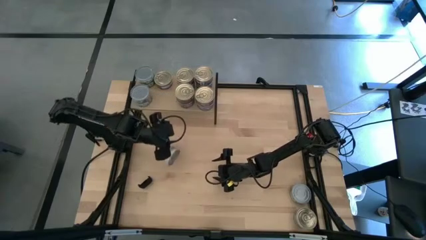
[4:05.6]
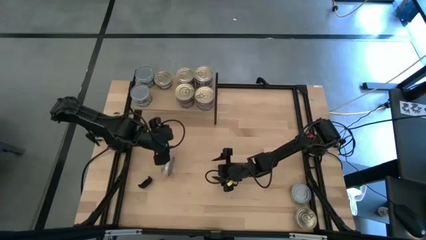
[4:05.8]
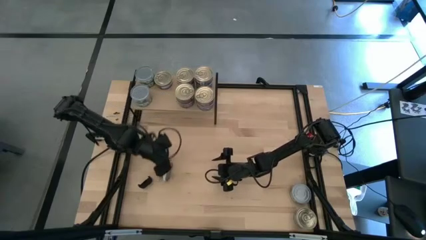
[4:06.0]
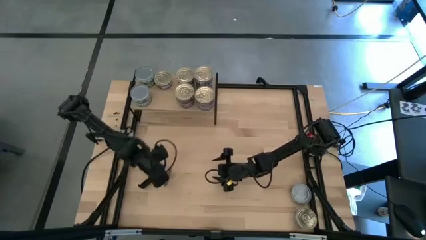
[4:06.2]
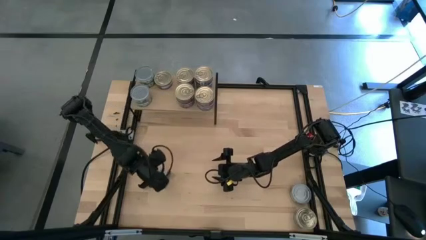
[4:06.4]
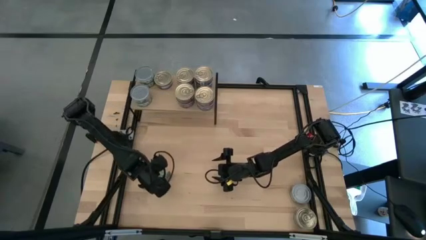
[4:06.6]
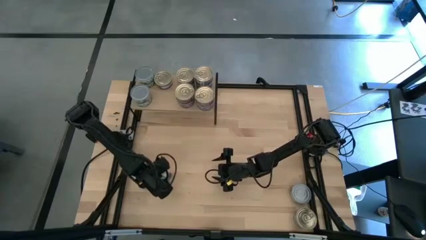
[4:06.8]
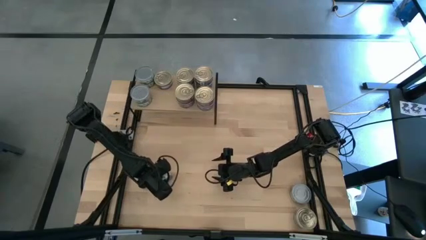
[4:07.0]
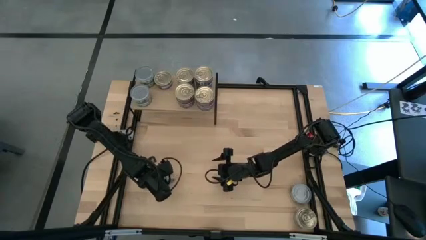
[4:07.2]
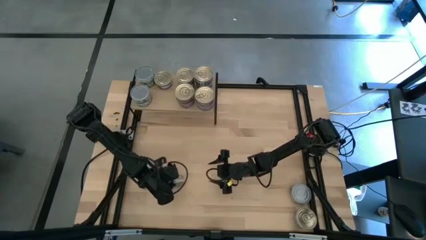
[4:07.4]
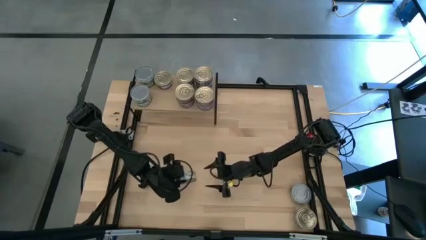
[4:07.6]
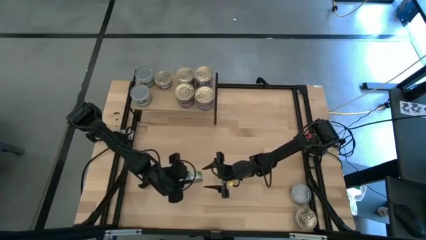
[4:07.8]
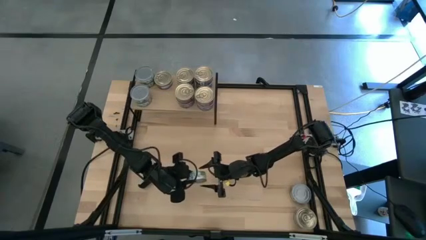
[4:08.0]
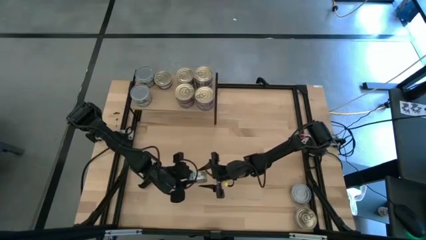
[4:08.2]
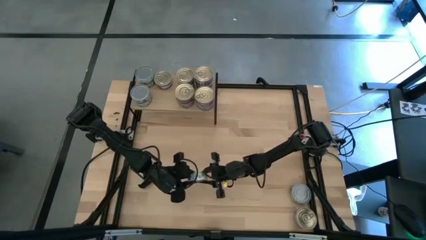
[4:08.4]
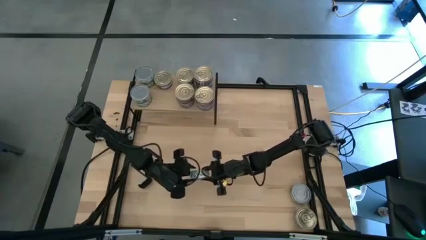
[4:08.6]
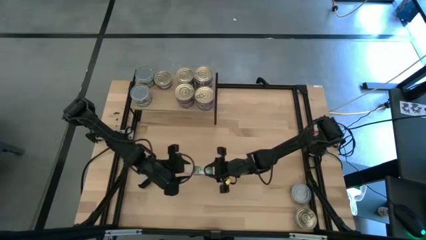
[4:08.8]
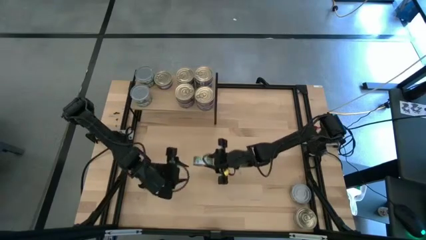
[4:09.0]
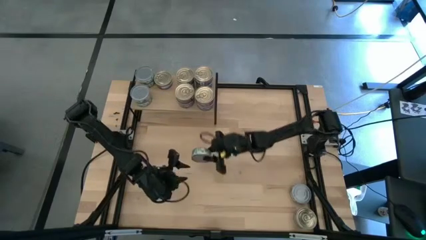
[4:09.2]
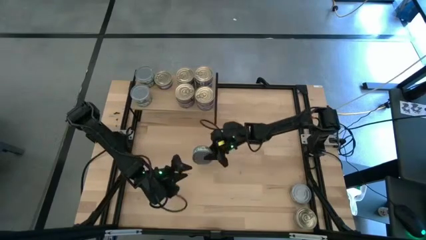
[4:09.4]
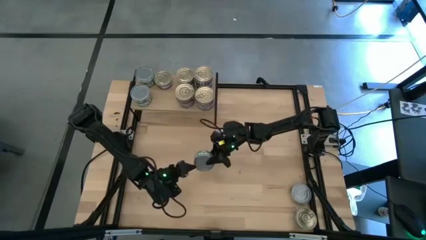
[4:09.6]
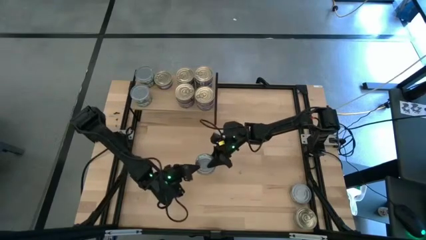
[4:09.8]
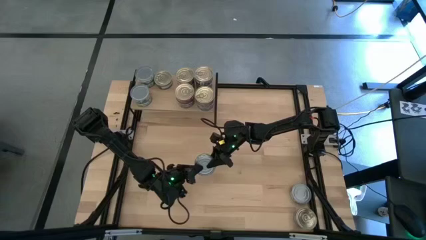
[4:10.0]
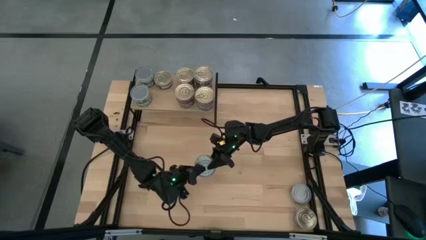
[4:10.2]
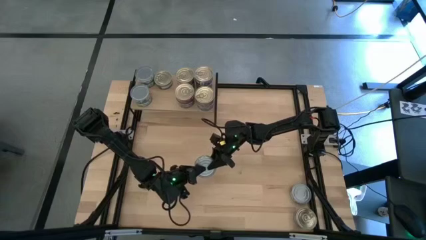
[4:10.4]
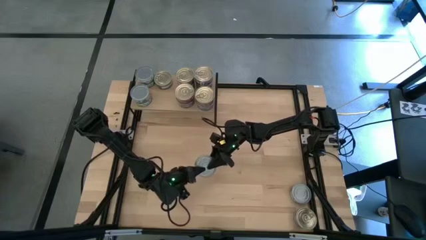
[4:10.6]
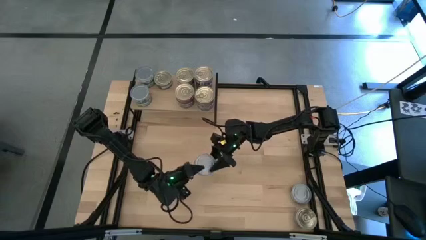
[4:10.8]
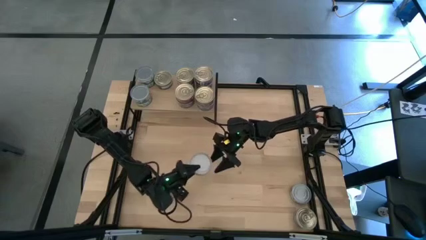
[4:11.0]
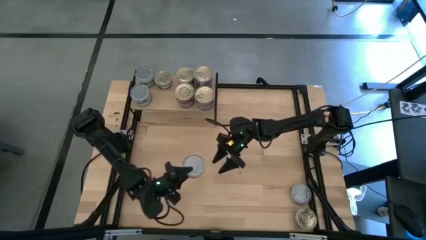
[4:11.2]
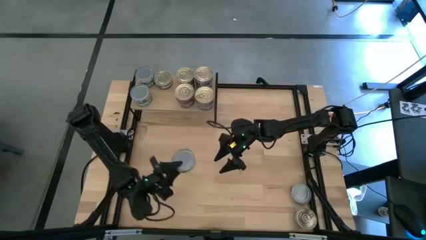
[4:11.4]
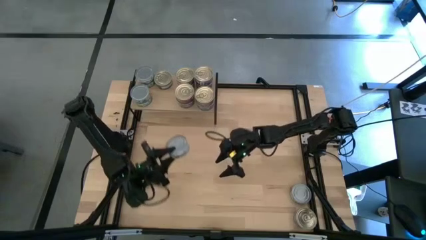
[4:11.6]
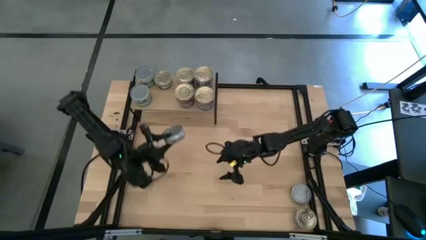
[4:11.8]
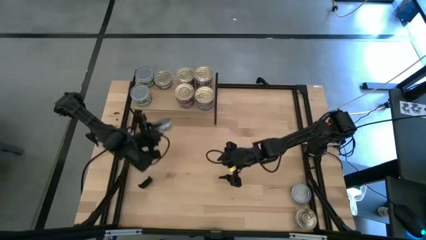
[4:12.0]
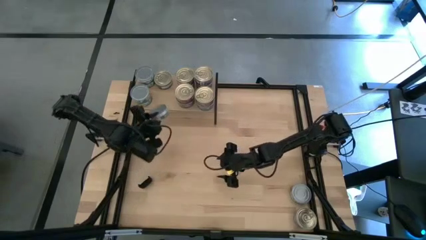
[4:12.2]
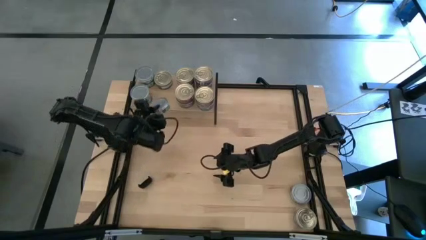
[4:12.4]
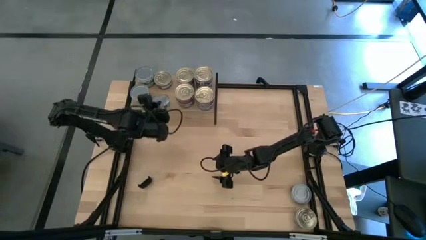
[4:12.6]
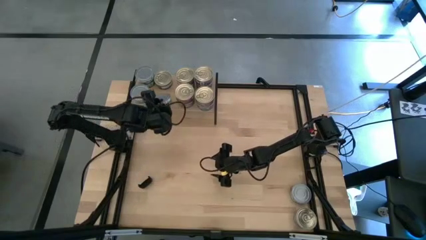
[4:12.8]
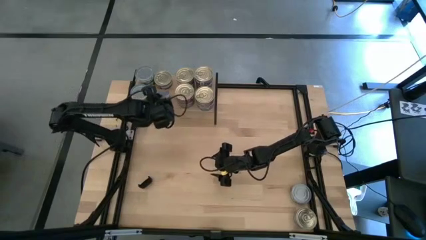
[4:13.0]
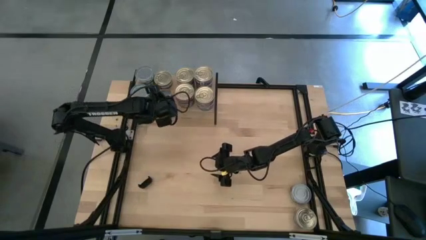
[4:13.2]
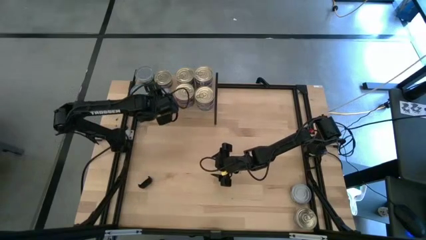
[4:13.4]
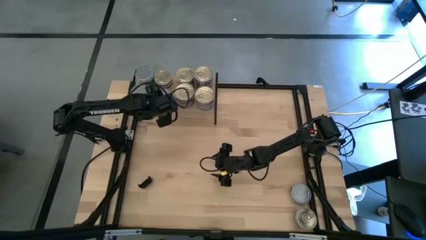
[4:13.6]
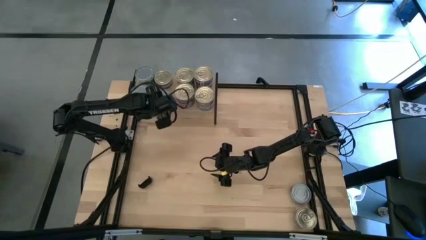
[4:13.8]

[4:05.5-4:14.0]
Task: Stack canned seafood by type on shelf
Put the green tuna can on the shelf

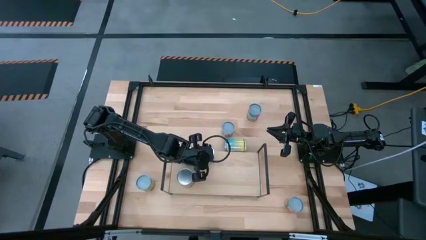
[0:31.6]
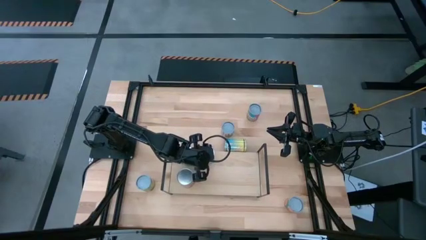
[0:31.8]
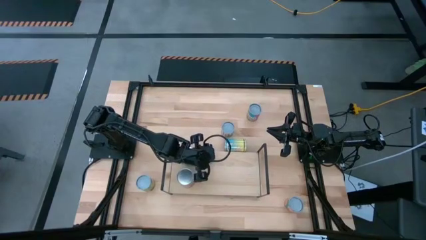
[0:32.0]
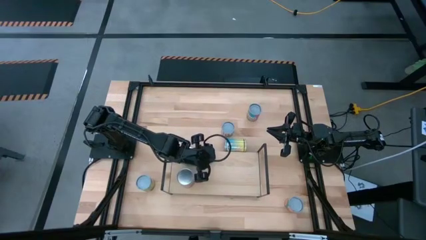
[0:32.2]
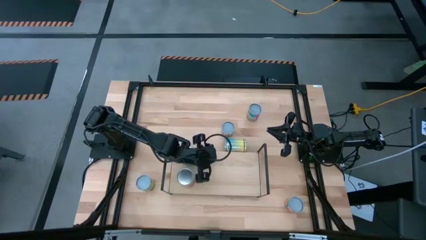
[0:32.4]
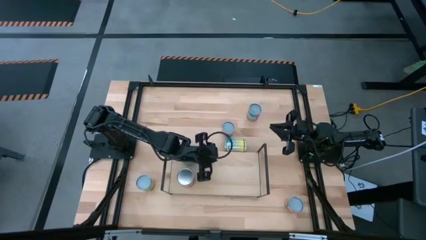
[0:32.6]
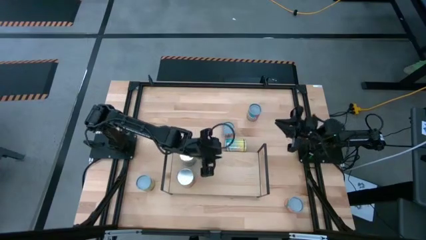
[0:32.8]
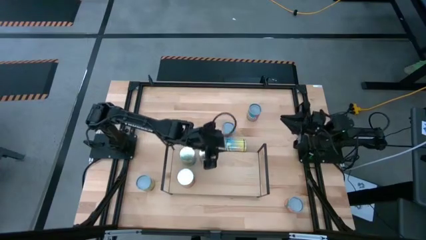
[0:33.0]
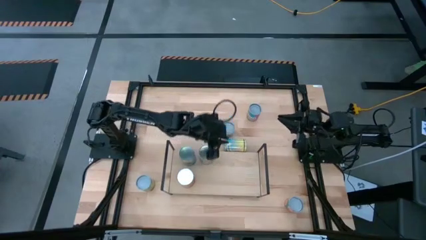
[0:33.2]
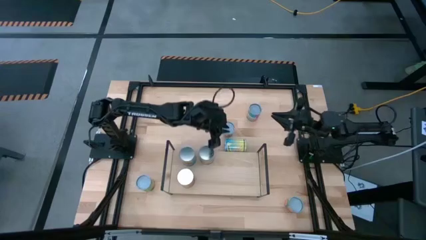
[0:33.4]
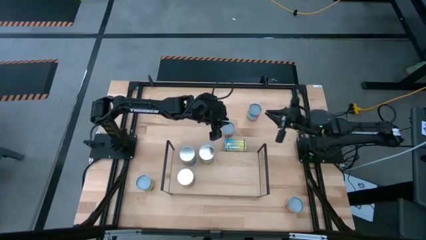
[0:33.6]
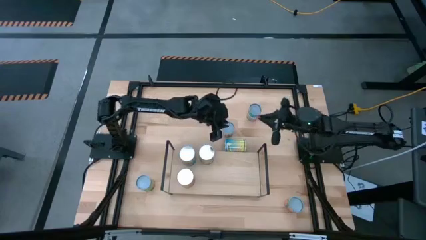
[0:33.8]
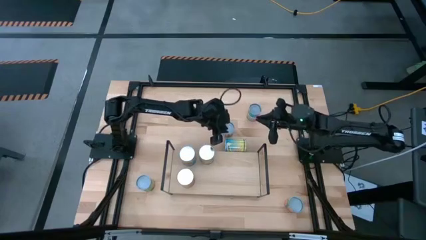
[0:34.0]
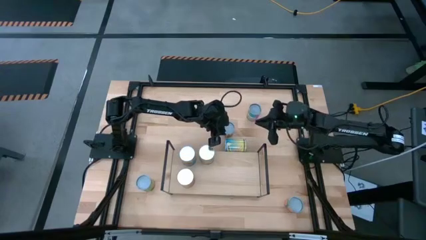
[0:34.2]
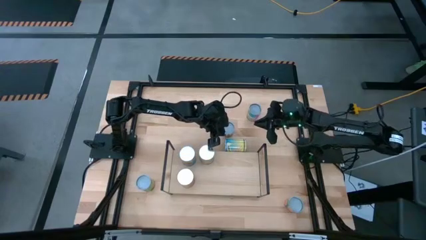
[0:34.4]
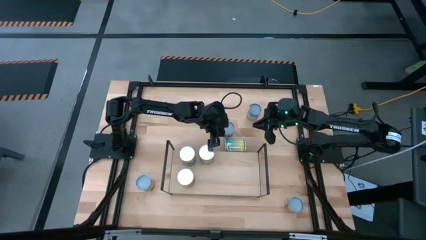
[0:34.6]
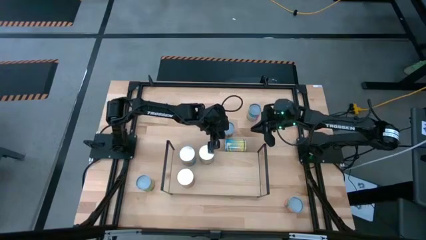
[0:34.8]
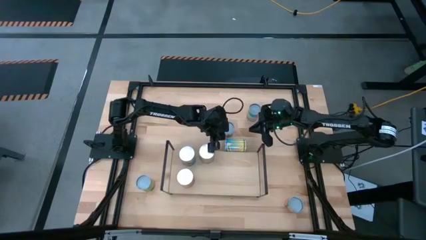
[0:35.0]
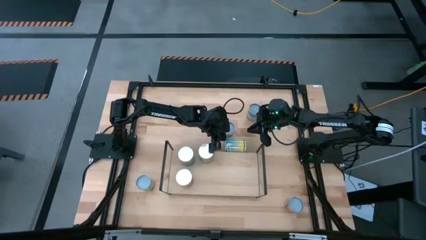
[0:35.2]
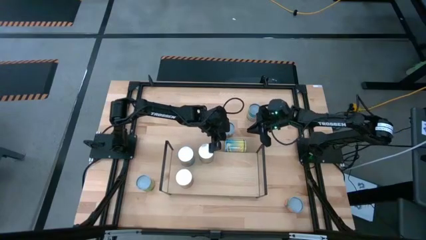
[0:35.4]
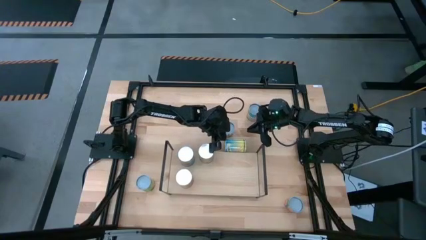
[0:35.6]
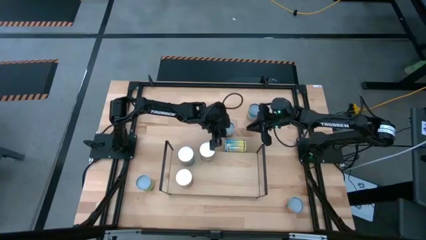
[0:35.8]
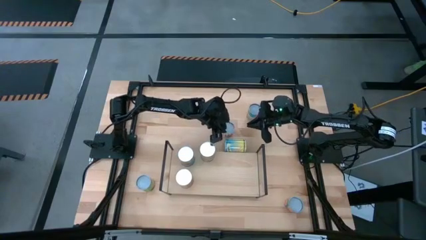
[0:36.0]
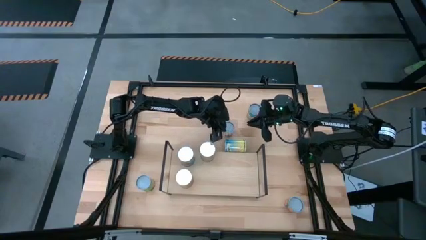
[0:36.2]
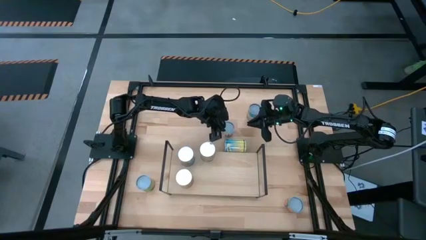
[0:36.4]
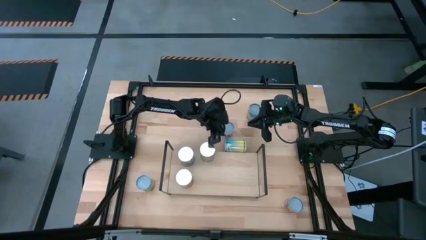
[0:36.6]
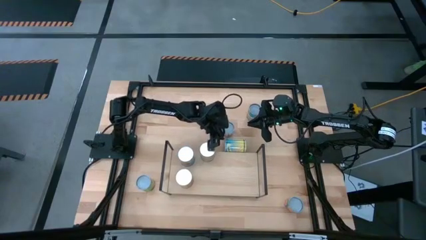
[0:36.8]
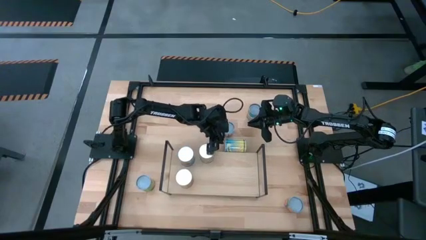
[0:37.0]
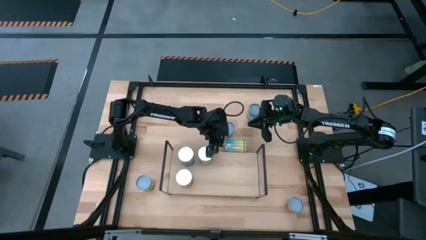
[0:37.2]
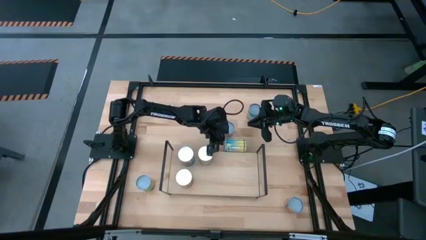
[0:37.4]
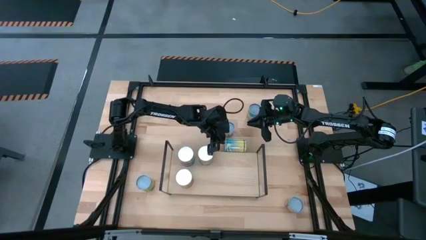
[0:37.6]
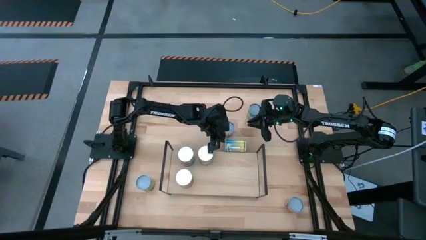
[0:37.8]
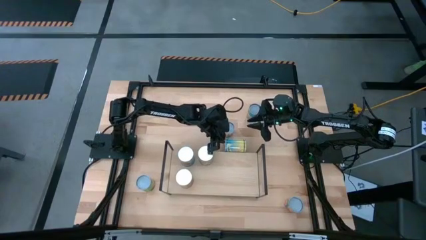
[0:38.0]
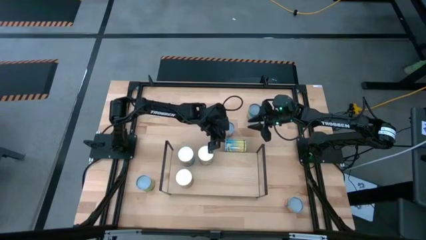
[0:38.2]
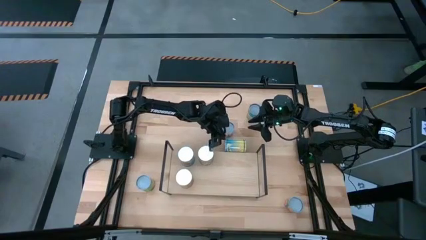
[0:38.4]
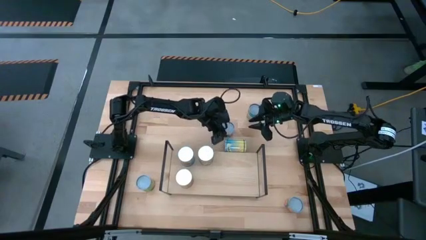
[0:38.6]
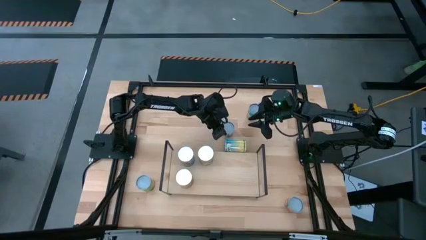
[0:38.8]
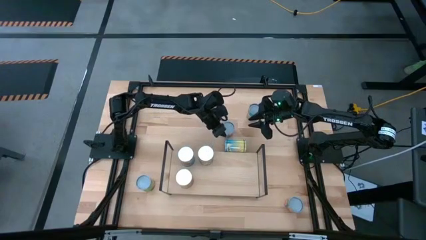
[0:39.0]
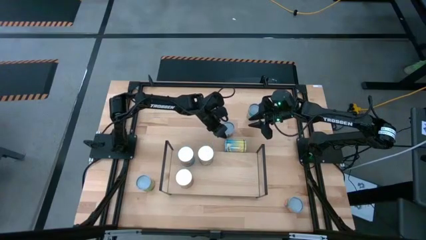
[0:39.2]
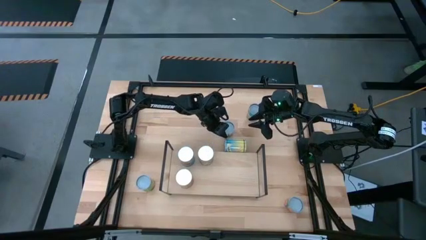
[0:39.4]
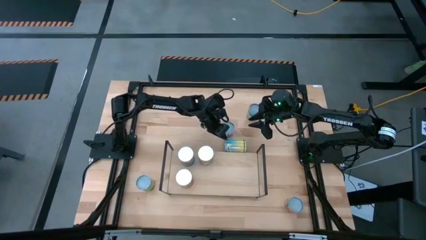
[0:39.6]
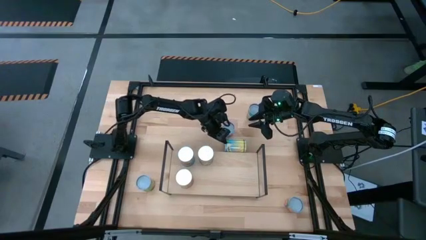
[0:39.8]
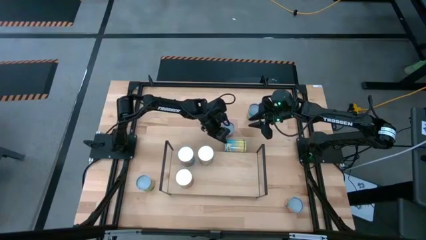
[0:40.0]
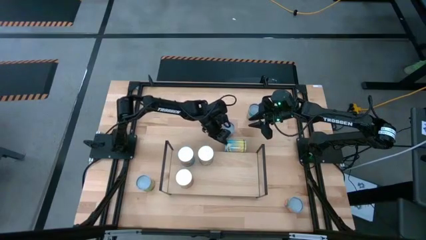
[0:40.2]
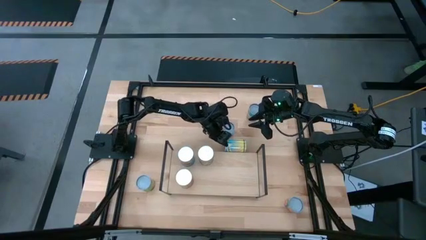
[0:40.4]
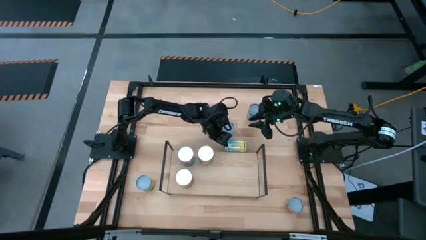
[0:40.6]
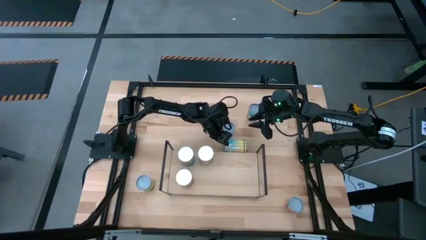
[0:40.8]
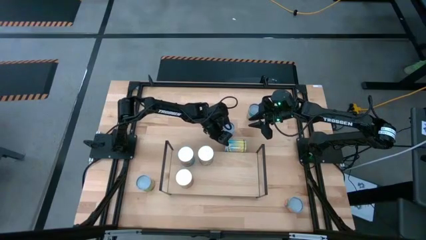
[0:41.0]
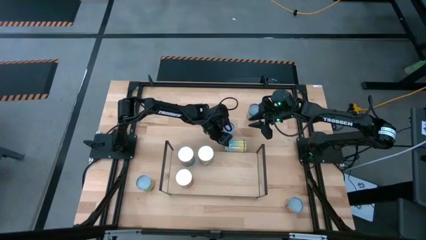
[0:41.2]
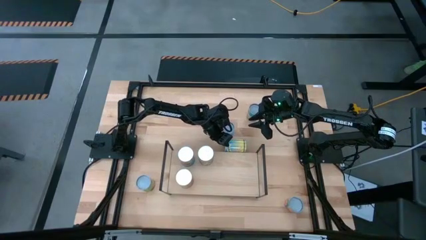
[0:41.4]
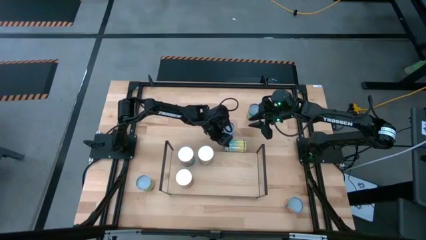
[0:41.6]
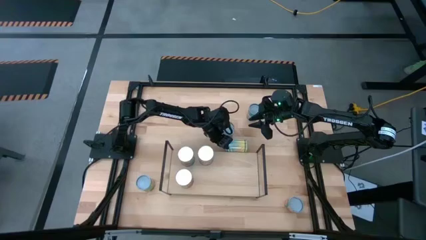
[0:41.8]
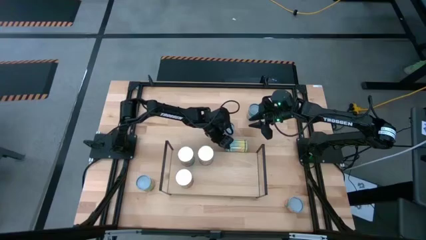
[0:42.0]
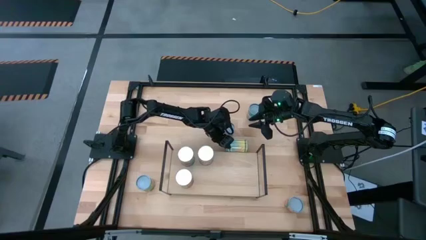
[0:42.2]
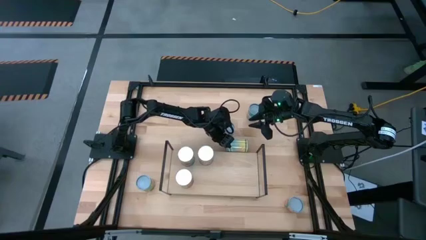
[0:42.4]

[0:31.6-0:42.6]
Task: Pick and place cans onto a shelf
Put the blue yellow canned carrot on the shelf
